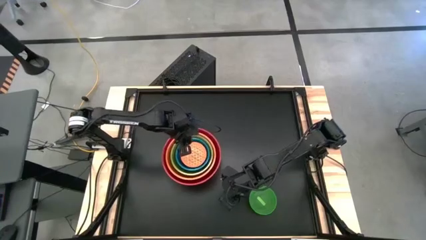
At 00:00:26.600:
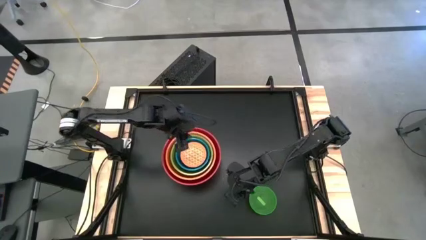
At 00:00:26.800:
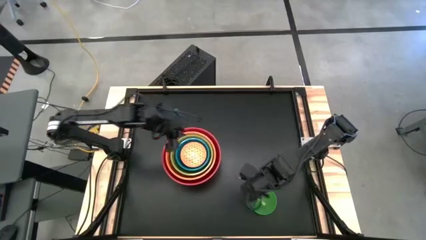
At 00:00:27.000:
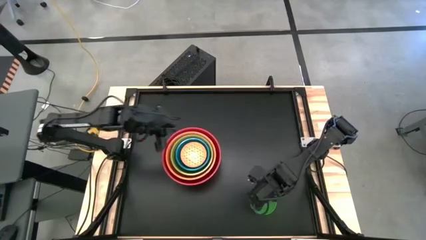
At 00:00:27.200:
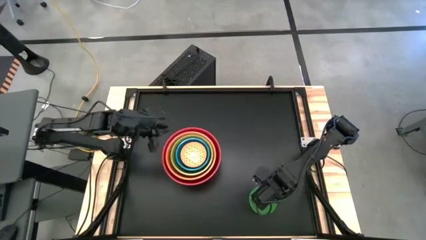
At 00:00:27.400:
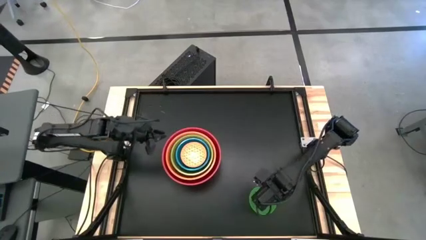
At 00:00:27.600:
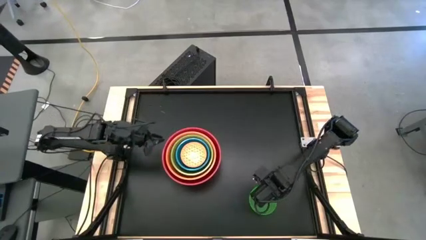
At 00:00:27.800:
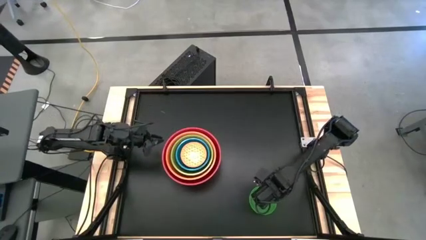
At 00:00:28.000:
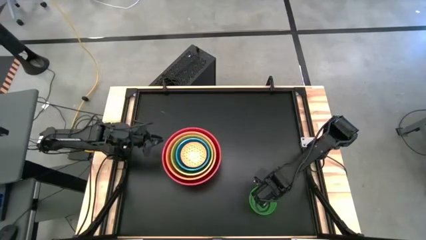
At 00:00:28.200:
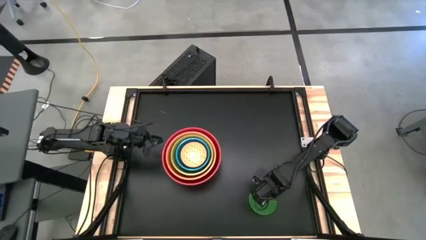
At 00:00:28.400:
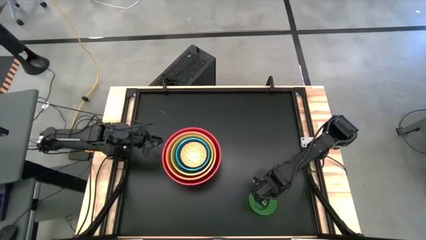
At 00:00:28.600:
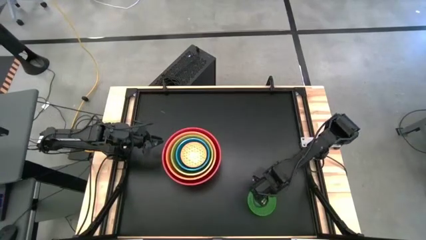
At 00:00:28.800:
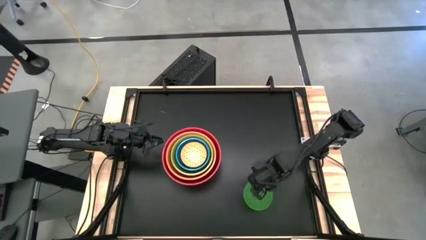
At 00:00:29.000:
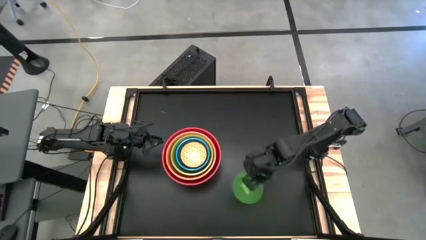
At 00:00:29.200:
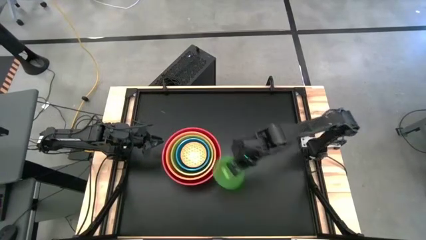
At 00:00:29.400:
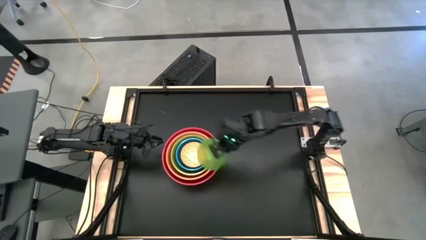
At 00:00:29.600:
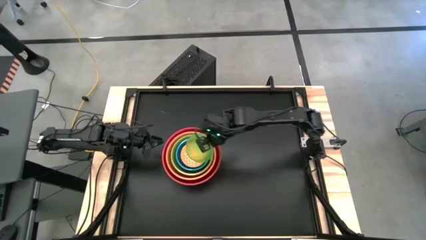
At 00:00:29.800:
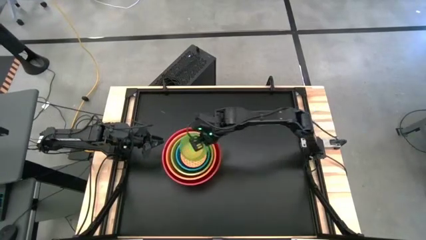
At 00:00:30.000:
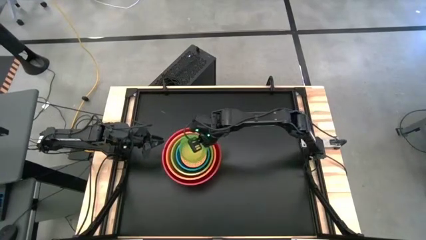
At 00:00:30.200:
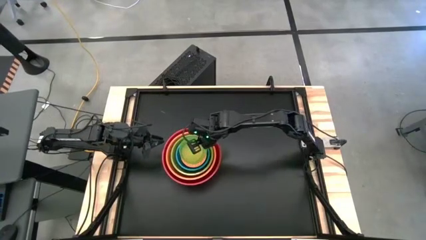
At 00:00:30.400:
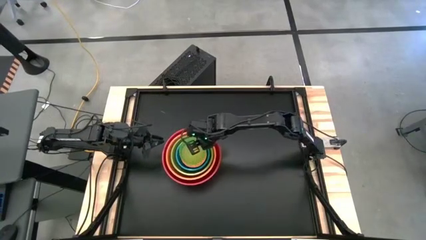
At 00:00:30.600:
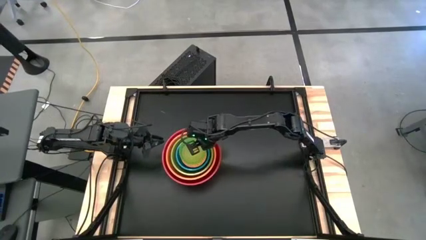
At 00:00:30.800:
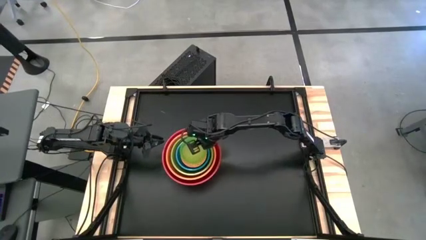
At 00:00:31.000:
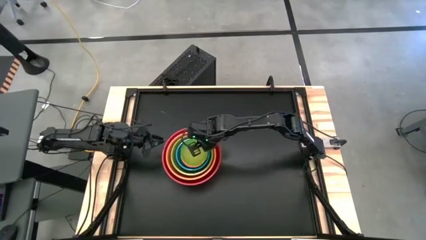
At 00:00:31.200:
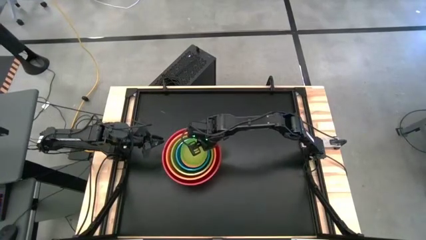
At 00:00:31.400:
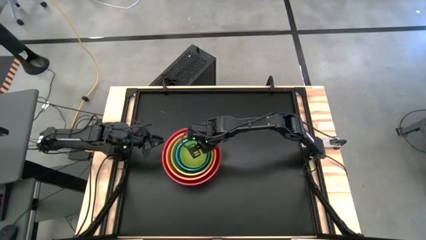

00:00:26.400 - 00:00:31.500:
Stack the green bowl on top of the orange patterned bowl

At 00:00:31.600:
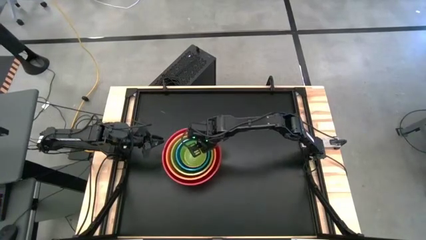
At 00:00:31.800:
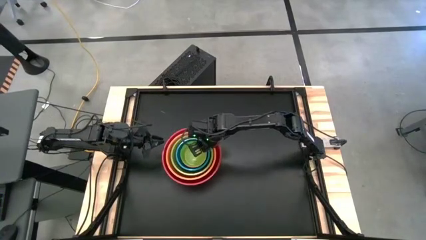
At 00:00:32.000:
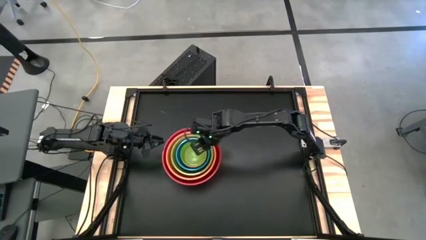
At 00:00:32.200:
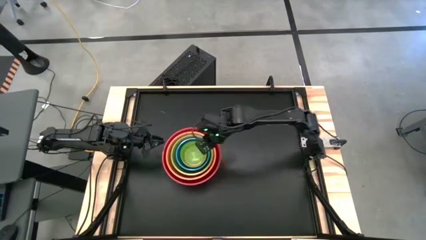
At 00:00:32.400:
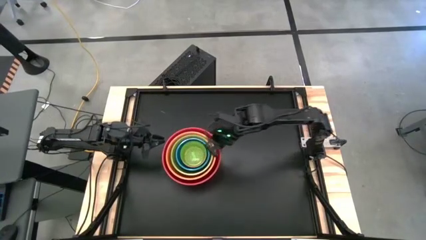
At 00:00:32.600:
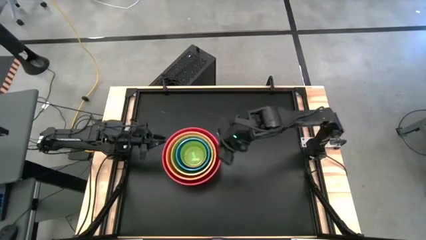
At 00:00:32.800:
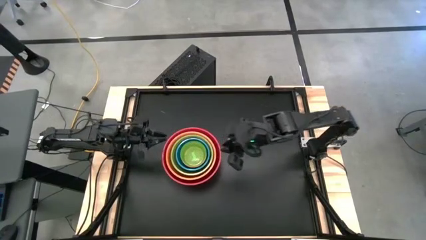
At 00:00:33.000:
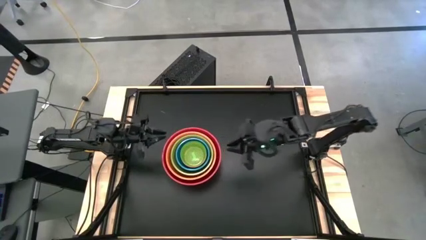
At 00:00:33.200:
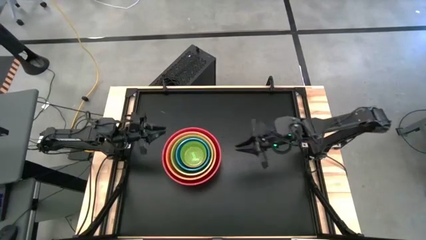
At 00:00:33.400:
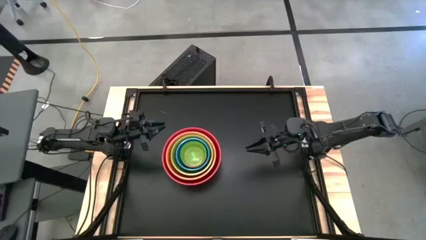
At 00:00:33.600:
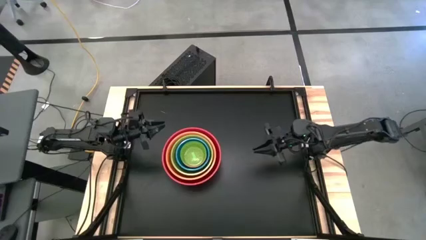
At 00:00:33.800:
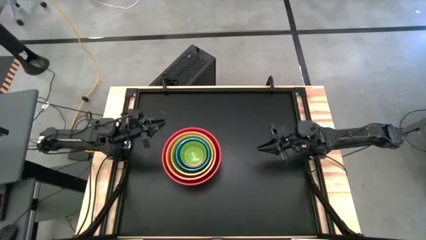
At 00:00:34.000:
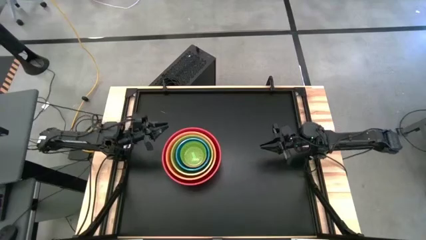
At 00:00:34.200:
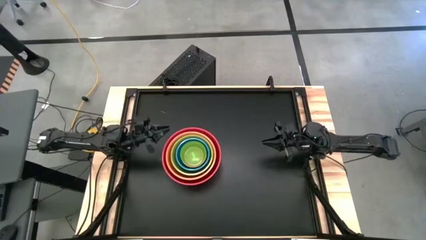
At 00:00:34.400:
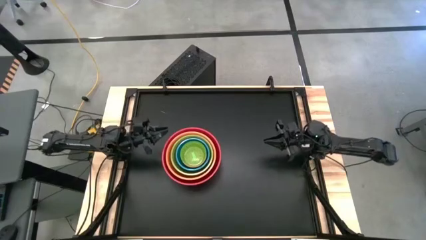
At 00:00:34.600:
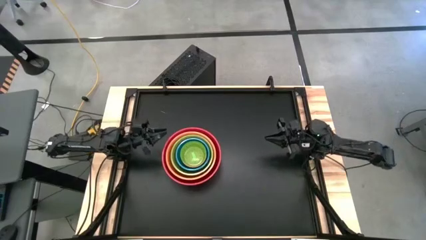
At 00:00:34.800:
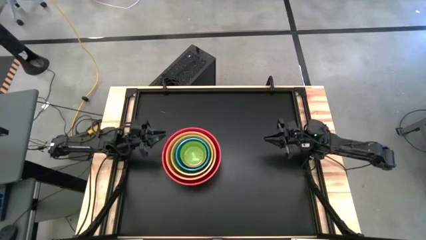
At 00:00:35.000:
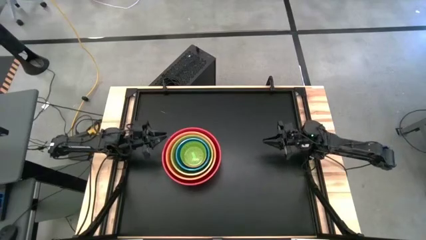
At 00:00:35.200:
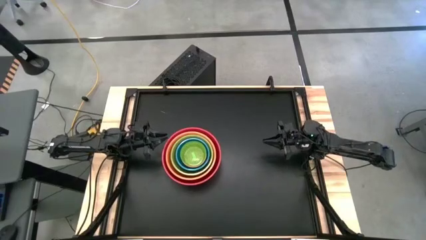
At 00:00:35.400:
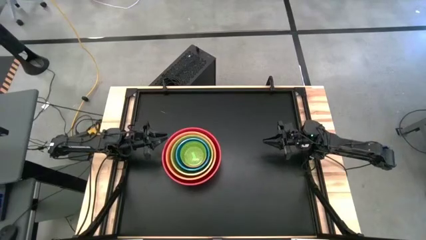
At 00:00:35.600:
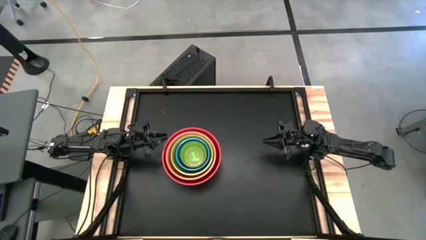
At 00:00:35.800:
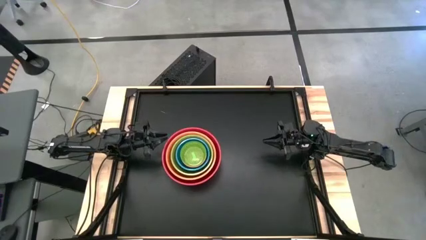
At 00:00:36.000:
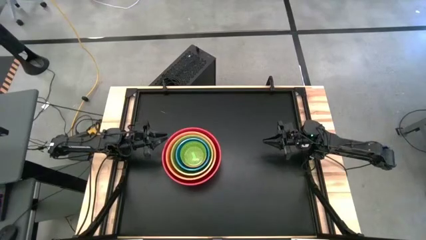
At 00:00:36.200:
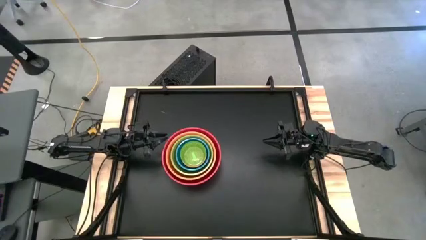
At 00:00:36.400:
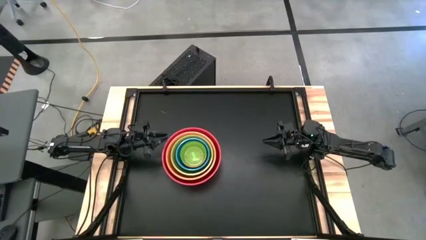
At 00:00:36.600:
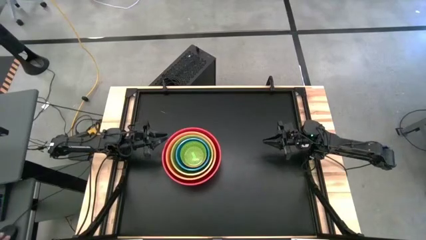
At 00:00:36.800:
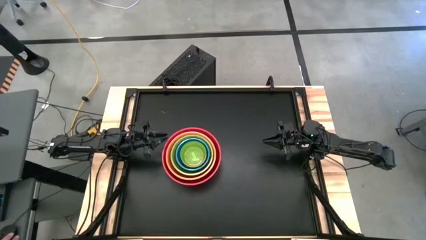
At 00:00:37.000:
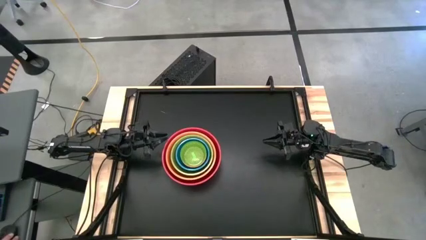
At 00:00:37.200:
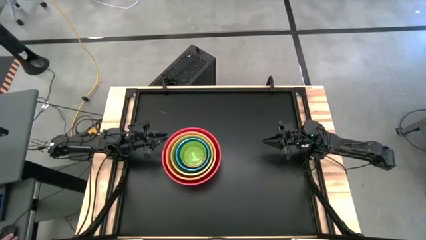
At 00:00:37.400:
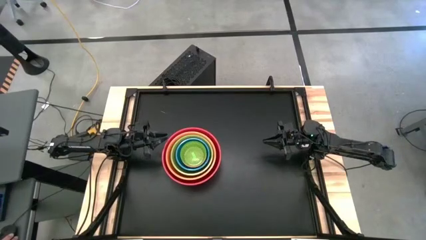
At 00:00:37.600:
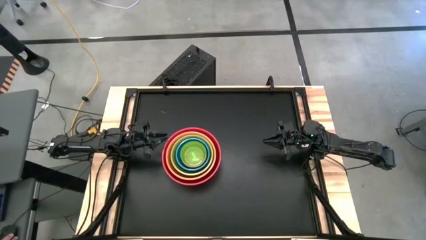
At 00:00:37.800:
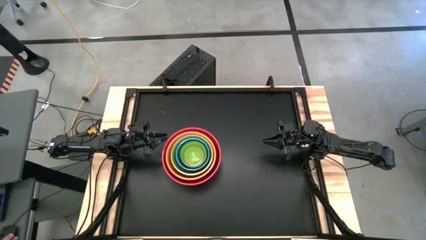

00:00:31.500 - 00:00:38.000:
Return to Home Position

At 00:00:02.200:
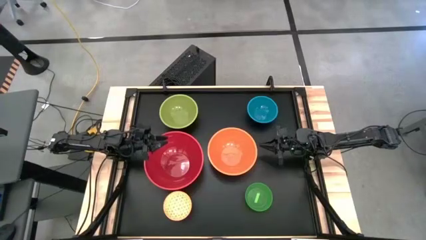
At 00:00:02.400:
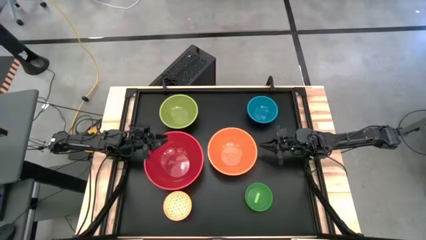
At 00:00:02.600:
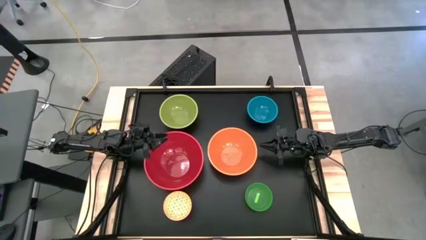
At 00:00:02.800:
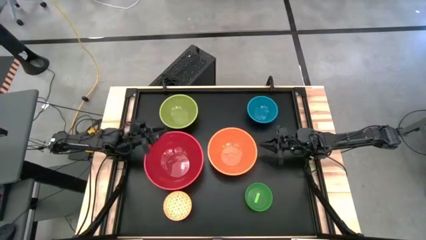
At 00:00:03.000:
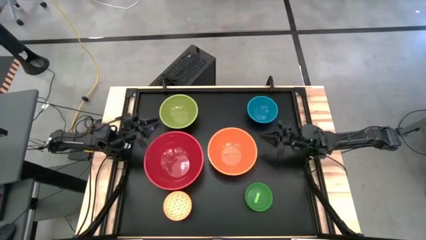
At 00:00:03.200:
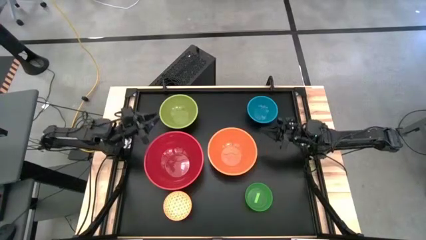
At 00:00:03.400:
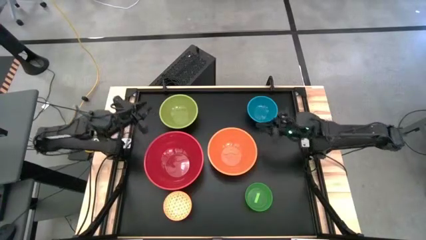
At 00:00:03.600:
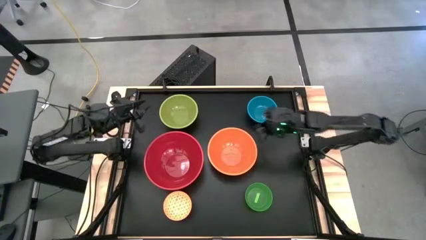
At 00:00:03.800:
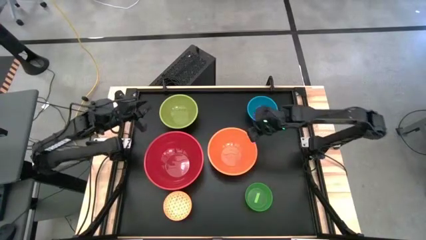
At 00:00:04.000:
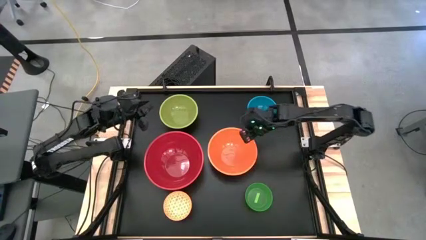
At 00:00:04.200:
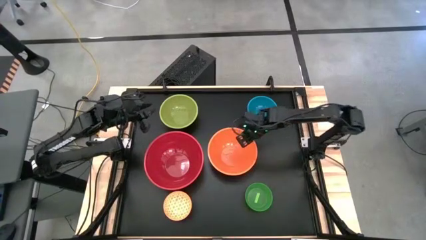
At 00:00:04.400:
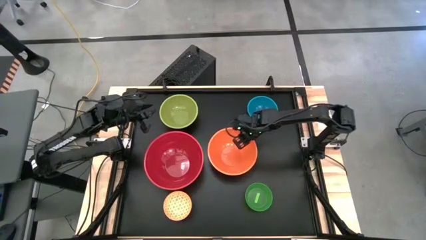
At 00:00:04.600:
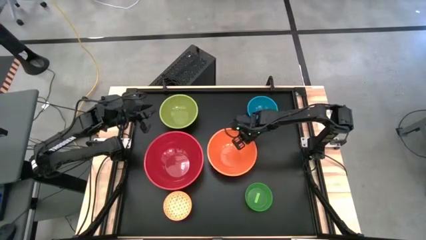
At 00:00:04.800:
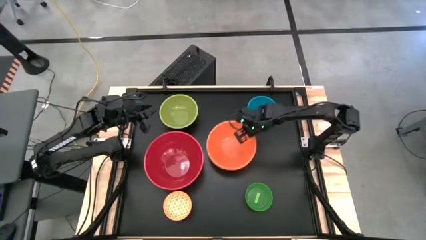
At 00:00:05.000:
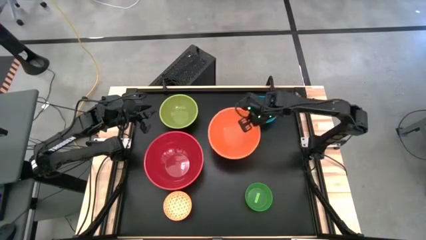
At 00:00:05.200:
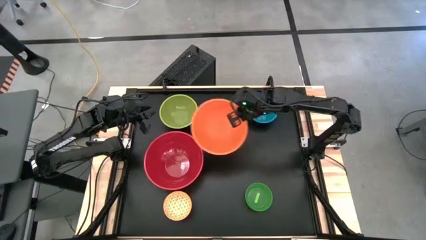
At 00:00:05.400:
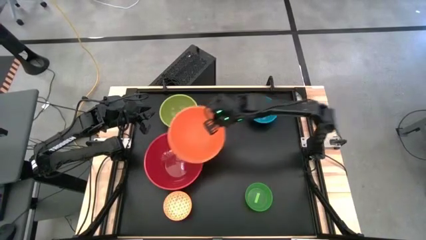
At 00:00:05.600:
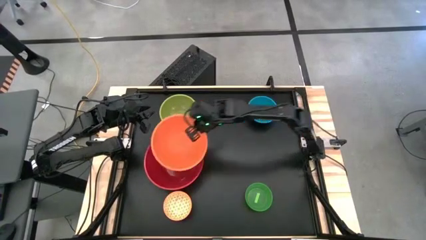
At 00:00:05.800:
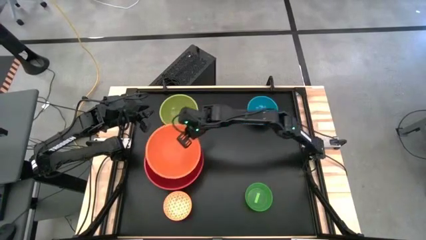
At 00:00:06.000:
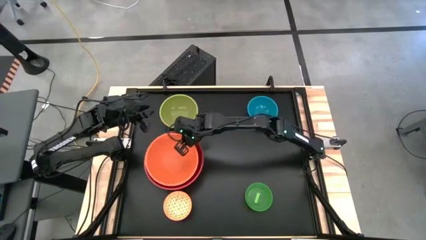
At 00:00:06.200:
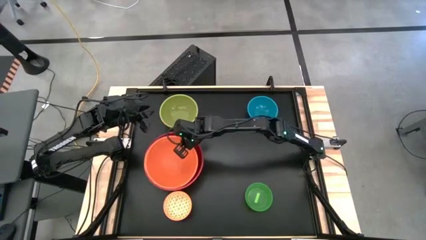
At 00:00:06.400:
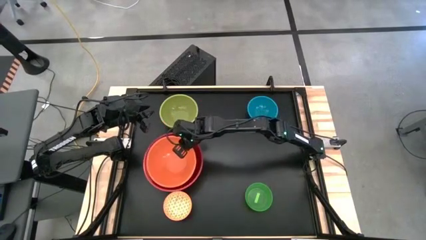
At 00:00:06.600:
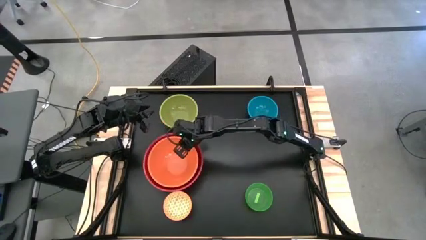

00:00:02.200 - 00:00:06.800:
Stack the orange bowl on top of the red bowl
